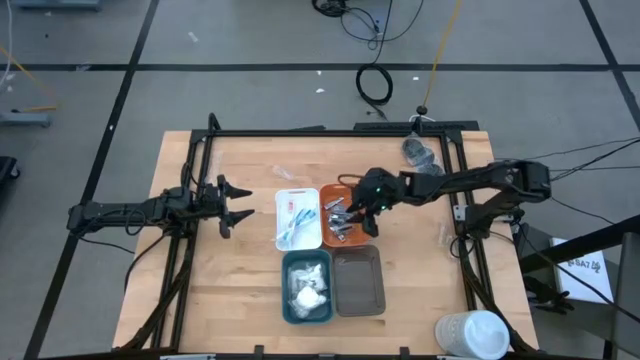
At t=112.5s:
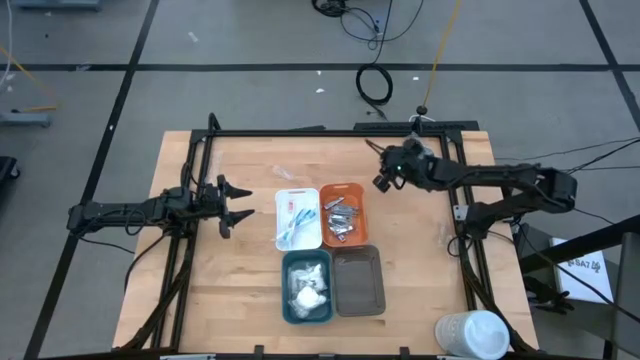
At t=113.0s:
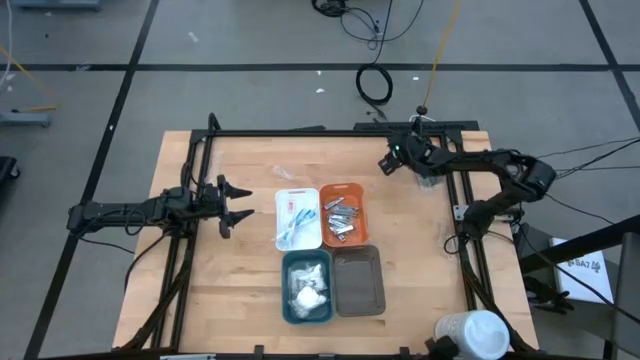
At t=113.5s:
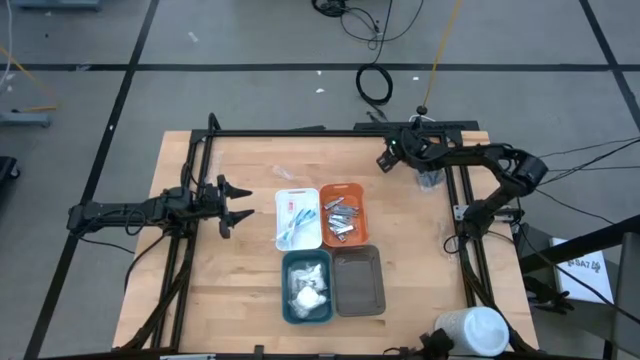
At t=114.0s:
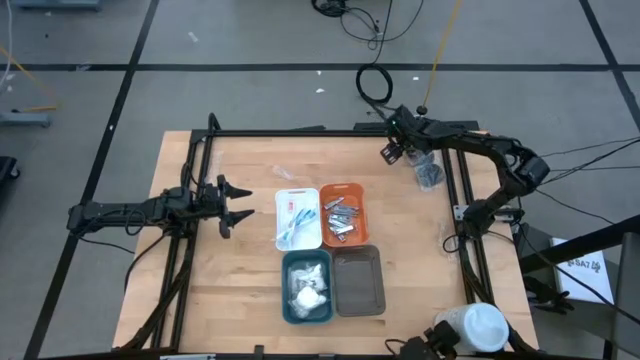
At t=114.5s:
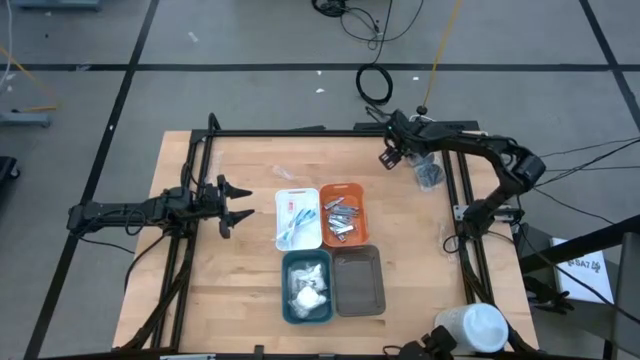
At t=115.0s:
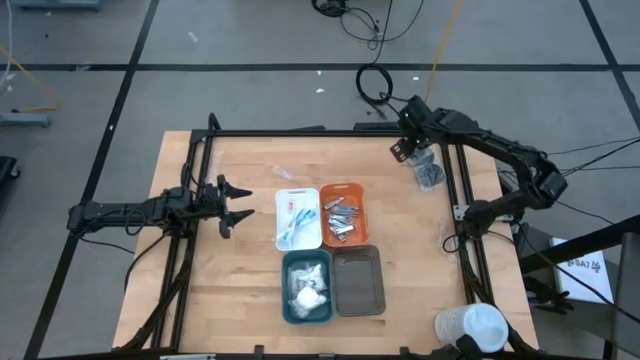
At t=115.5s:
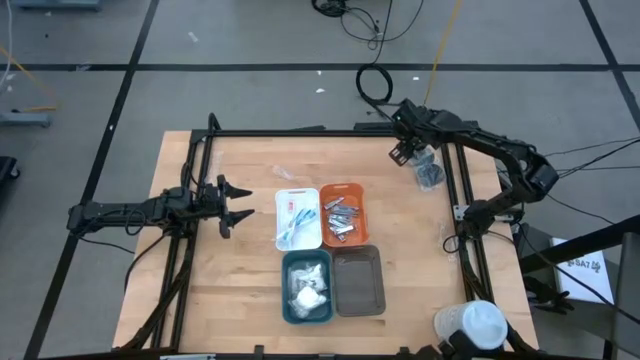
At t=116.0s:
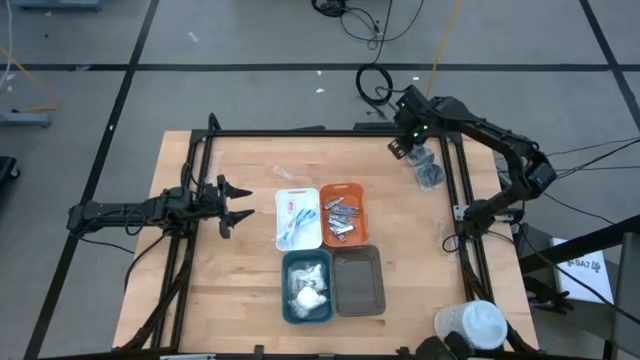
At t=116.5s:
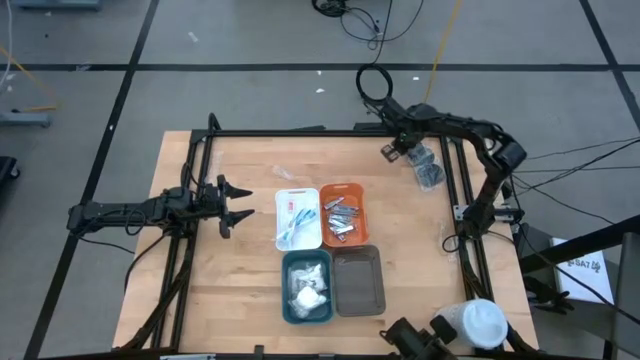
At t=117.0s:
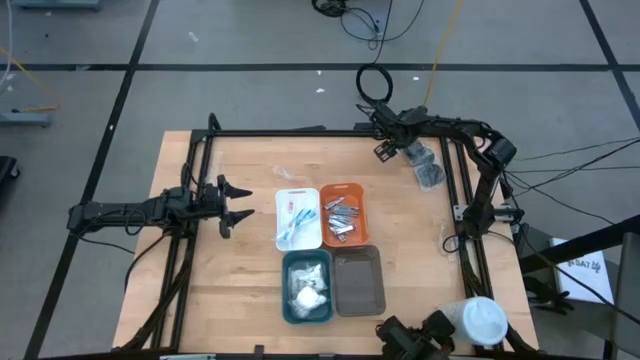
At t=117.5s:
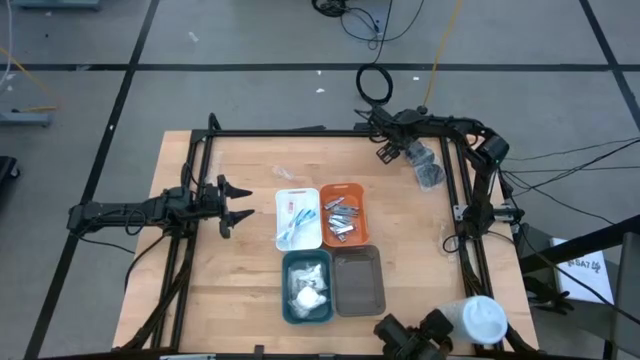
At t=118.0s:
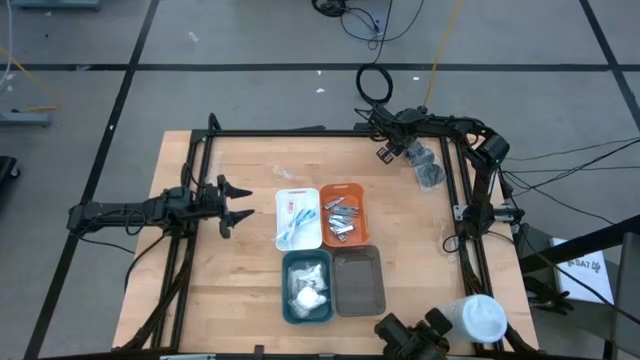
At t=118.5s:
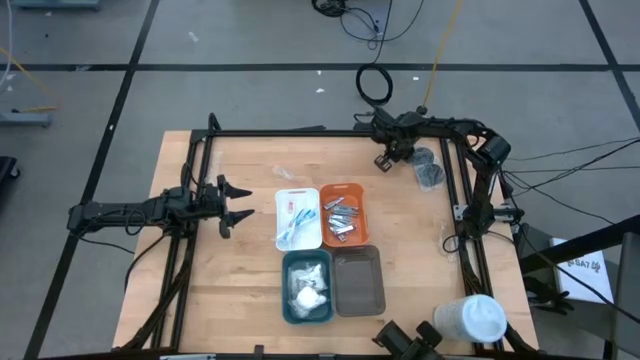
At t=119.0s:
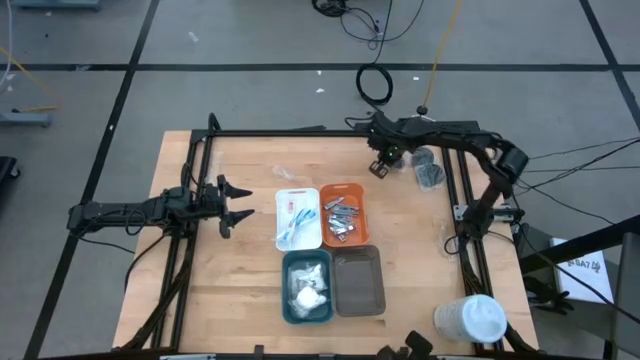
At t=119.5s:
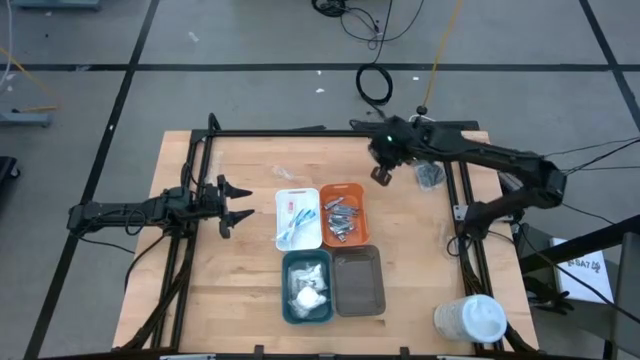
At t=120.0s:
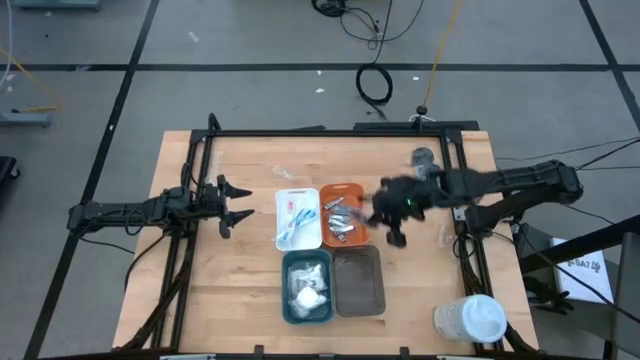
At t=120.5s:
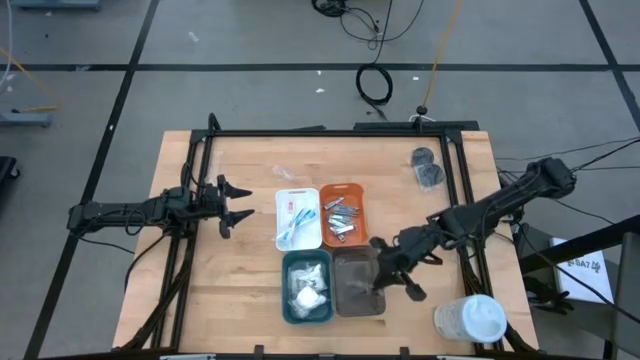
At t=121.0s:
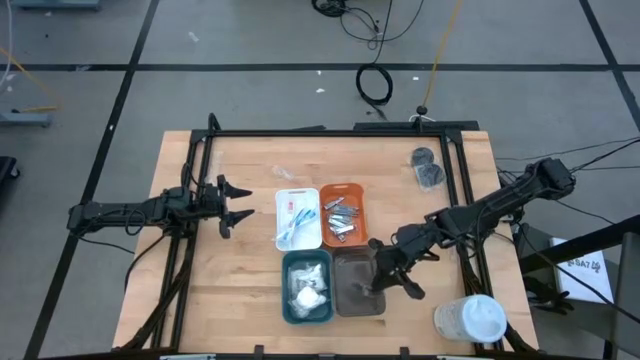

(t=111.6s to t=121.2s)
Task: Pick & Place Travel size toiletries
Put the top hairbrush into the gray bin

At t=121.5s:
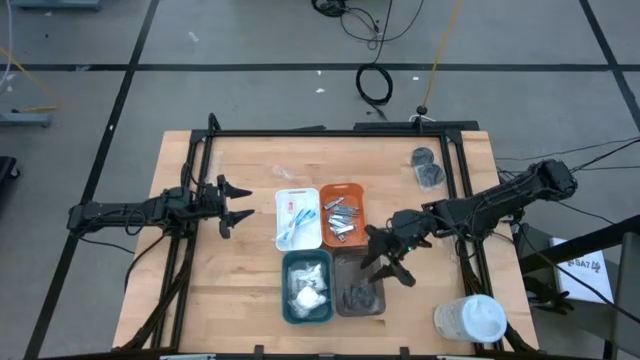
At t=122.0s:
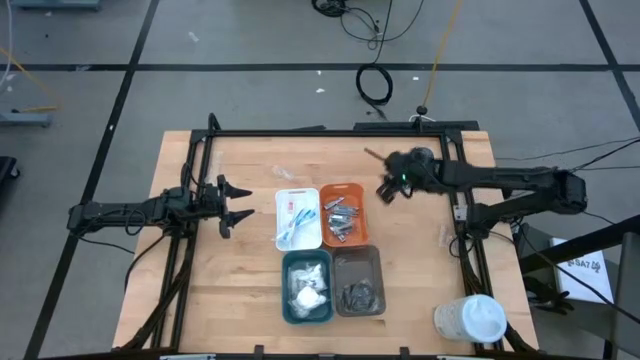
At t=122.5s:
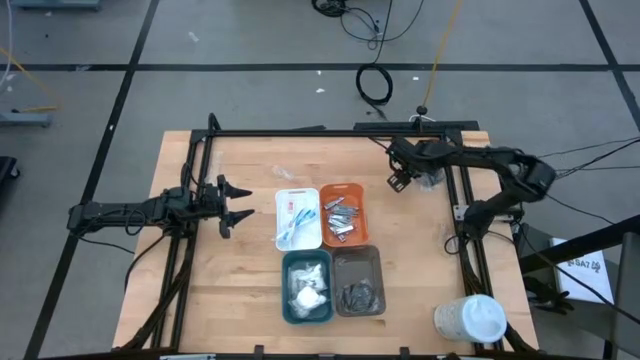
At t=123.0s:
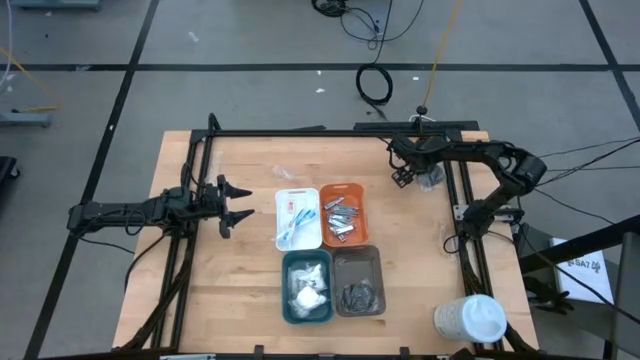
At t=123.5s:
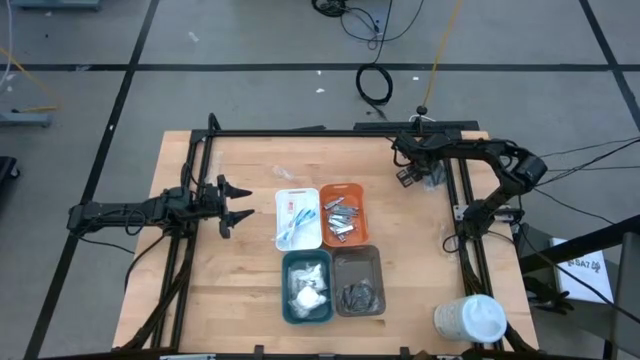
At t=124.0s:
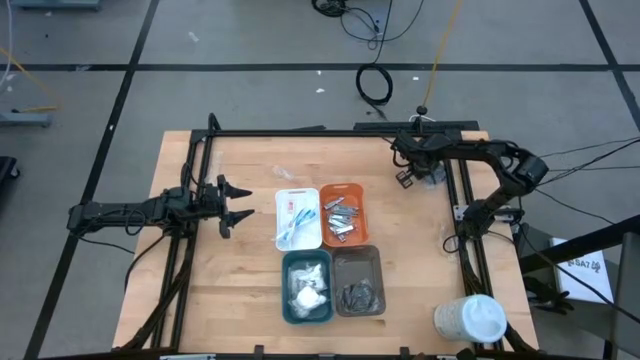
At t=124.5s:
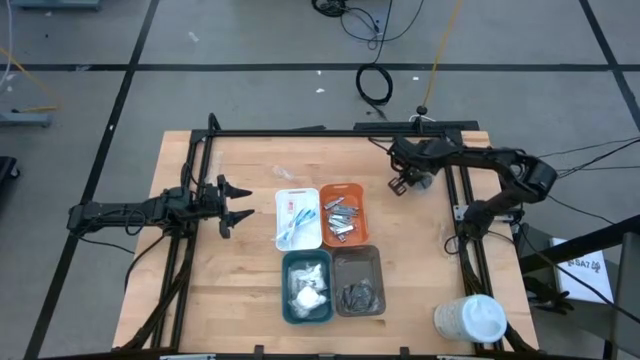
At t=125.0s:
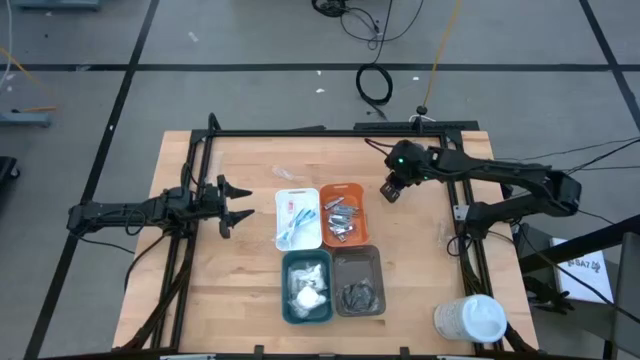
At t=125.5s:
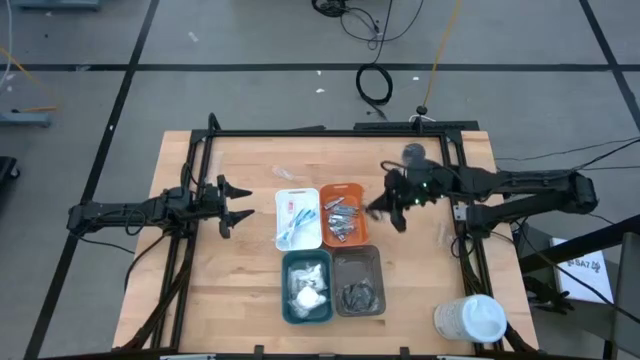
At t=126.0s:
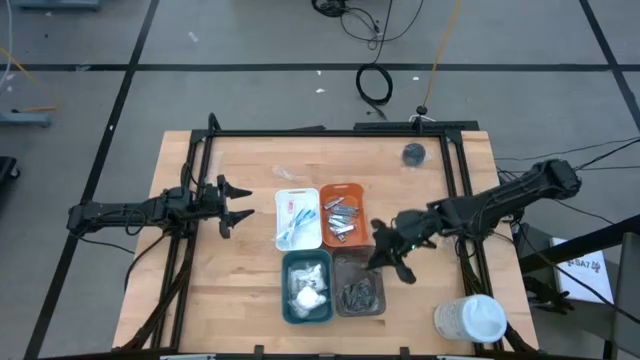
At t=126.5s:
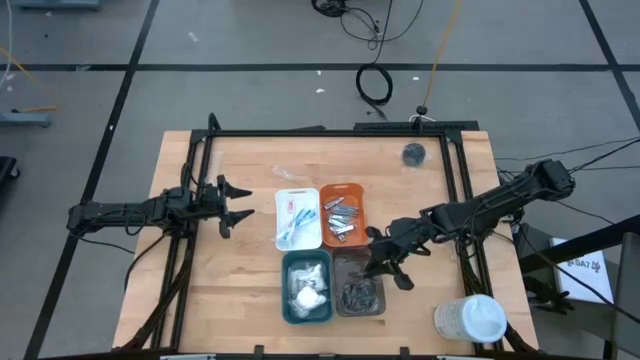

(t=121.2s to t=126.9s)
Put the bottom hairbrush into the gray bin

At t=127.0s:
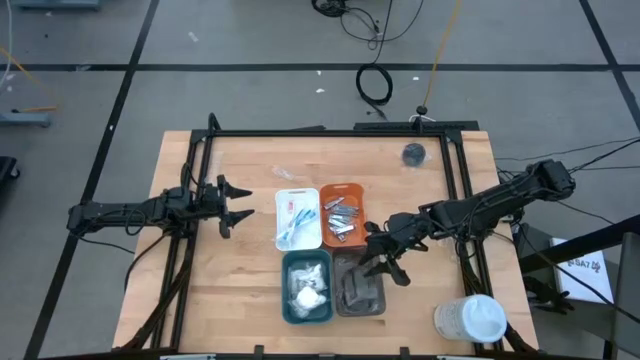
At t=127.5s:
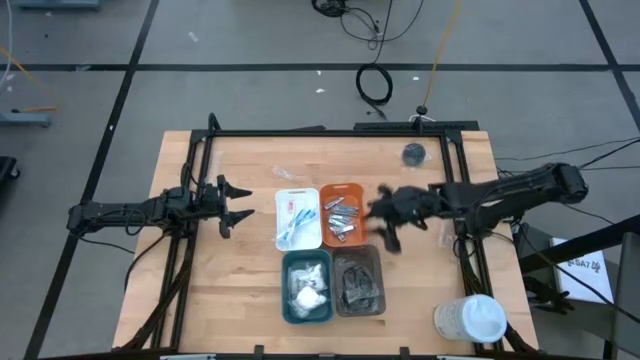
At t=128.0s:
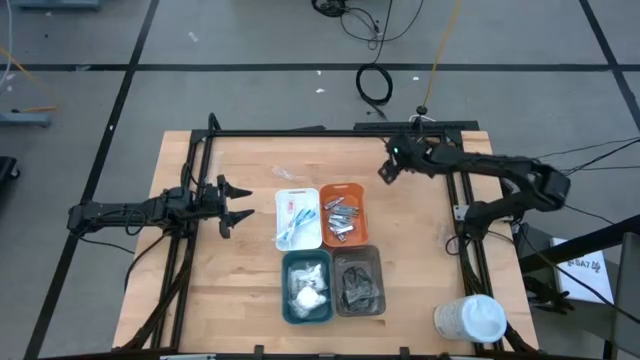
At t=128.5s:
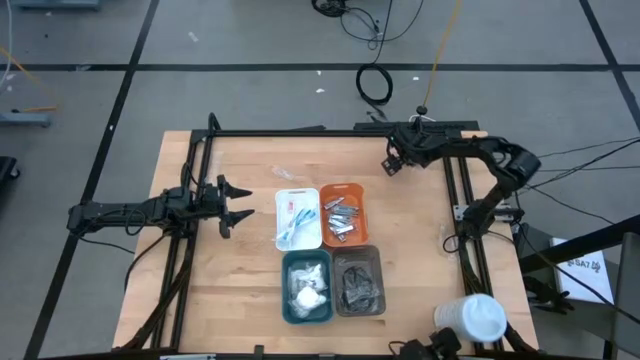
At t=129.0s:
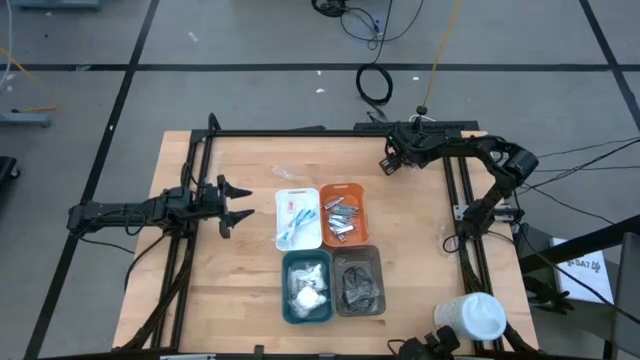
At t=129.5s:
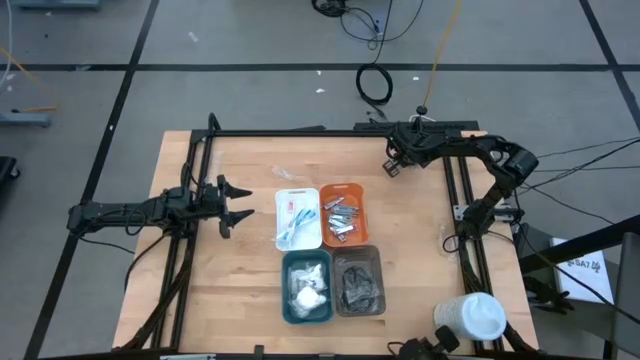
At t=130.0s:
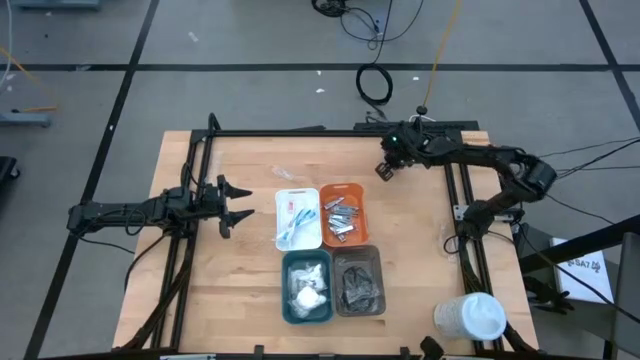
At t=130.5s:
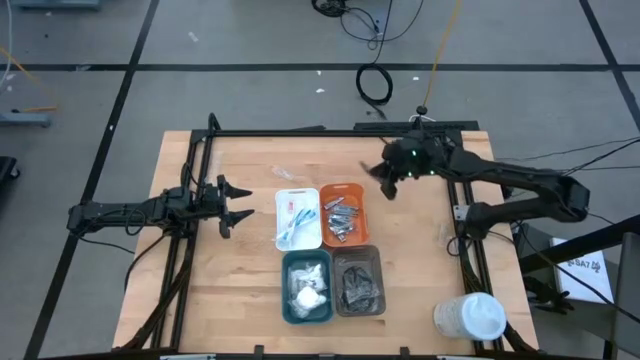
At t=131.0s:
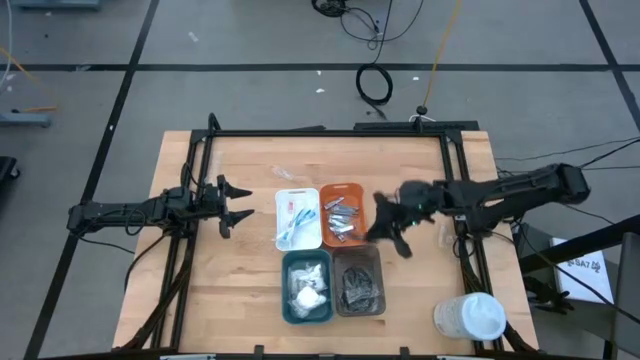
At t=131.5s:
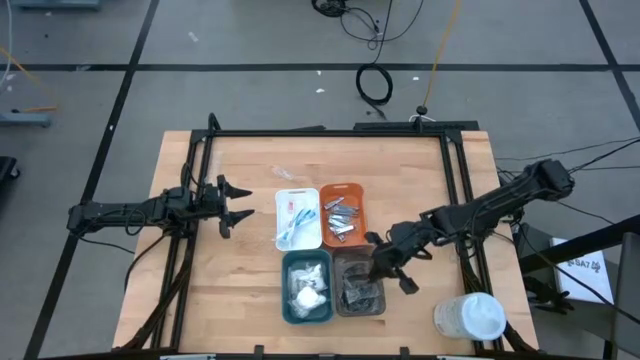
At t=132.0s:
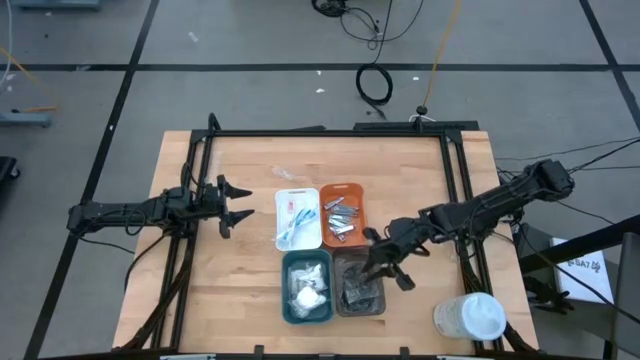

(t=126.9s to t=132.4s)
Put the hairbrush into the gray bin
